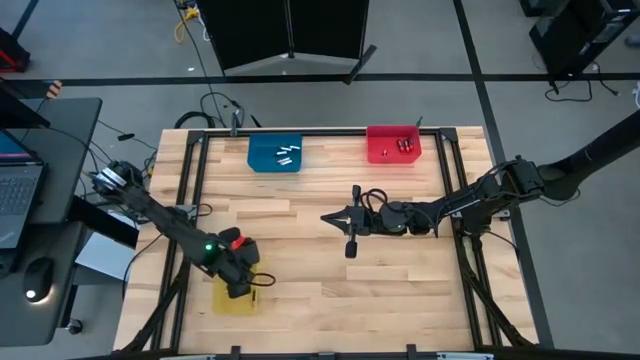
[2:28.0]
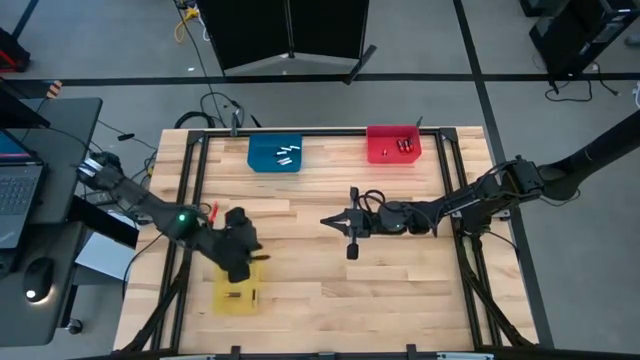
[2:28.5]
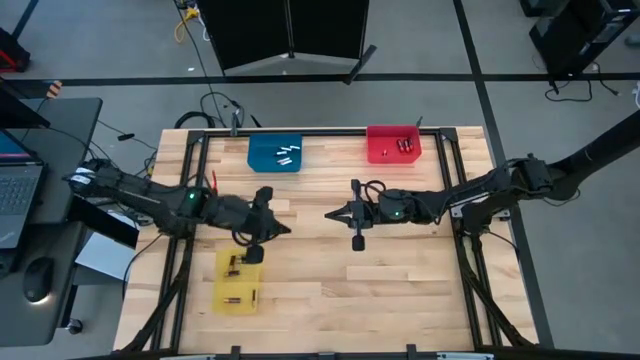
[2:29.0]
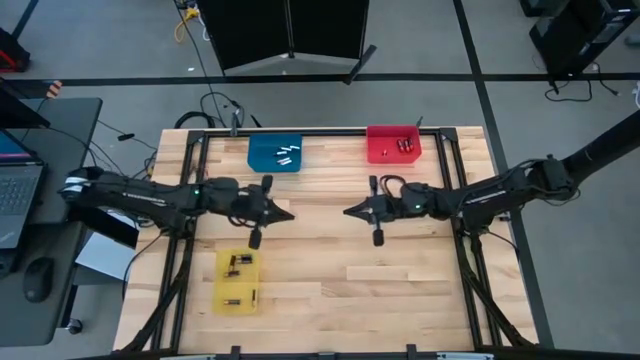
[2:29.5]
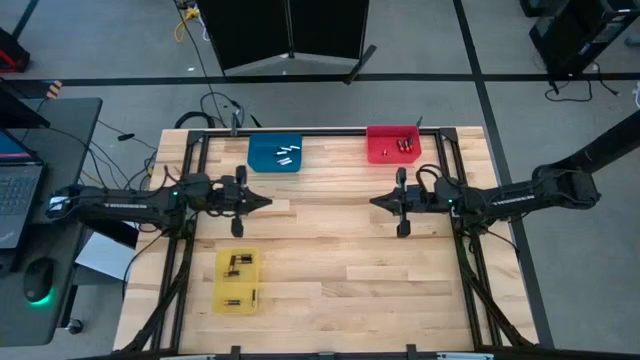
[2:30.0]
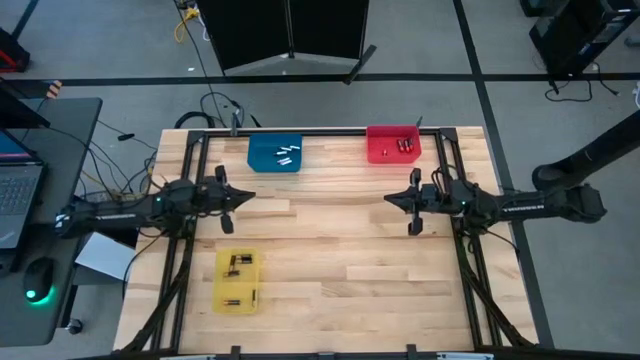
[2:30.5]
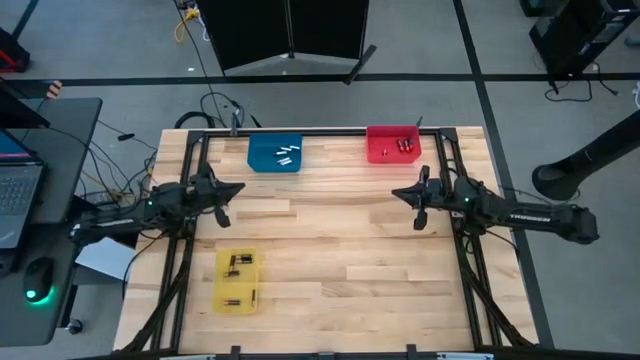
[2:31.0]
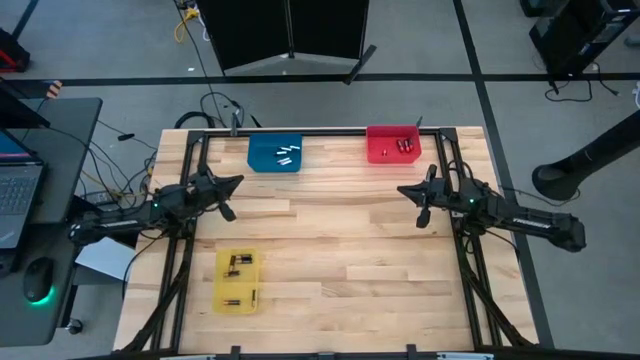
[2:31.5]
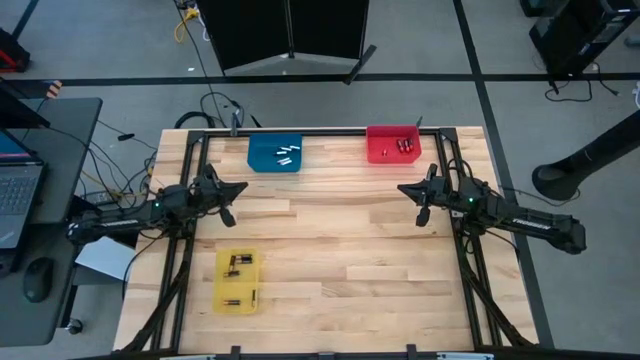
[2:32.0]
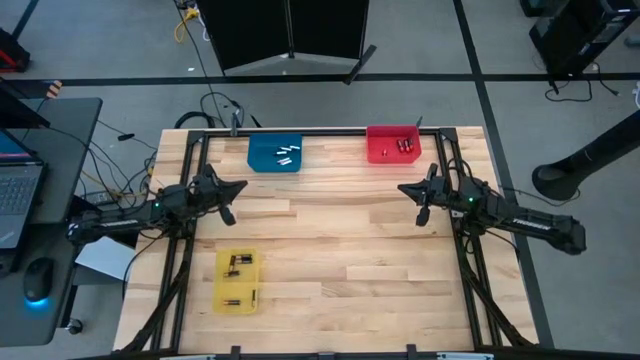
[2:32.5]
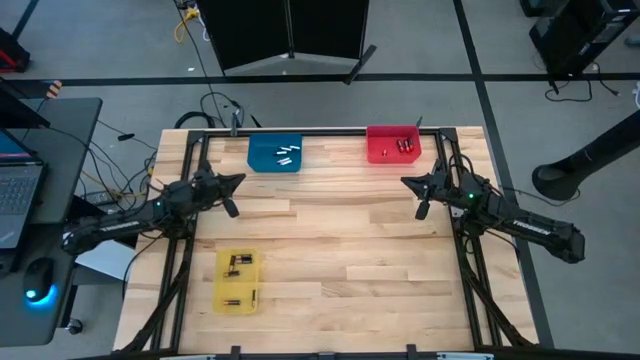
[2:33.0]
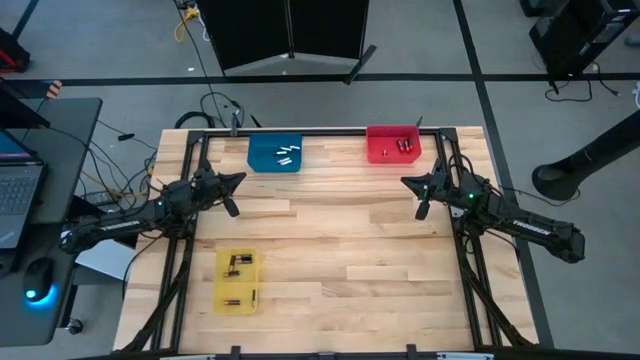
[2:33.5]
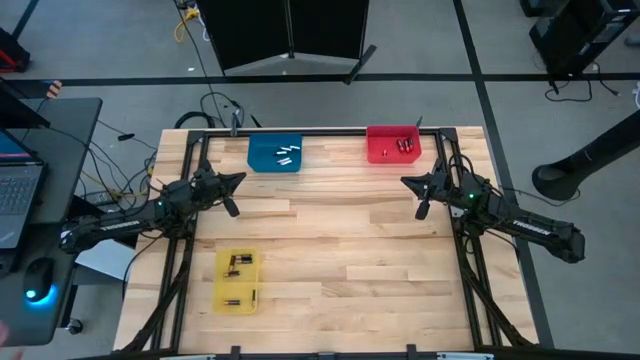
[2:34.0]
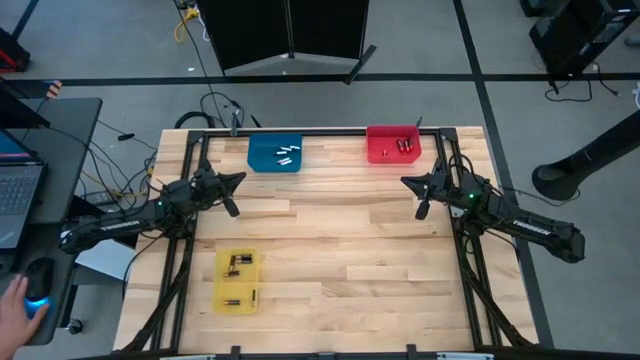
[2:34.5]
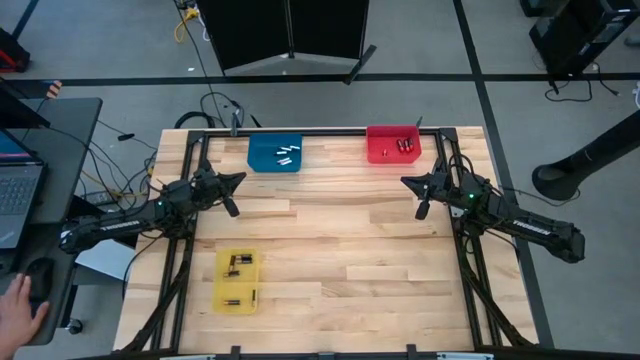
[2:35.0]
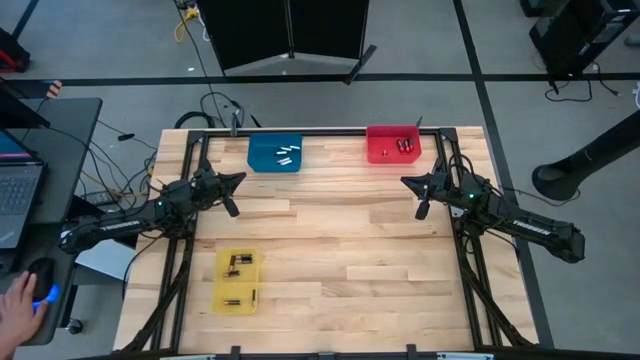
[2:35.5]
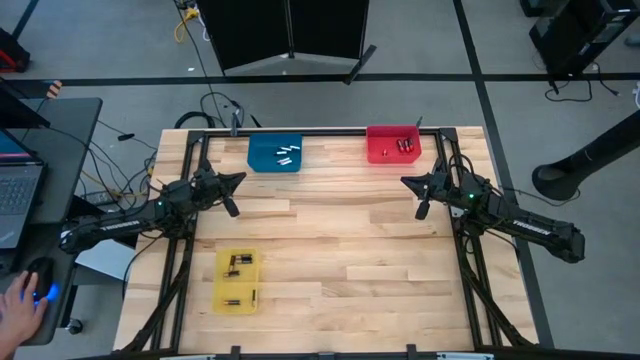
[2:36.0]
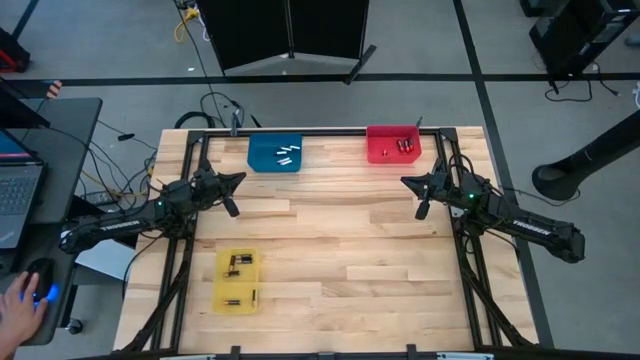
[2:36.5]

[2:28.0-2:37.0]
Task: Sort batteries
Return to Home Position

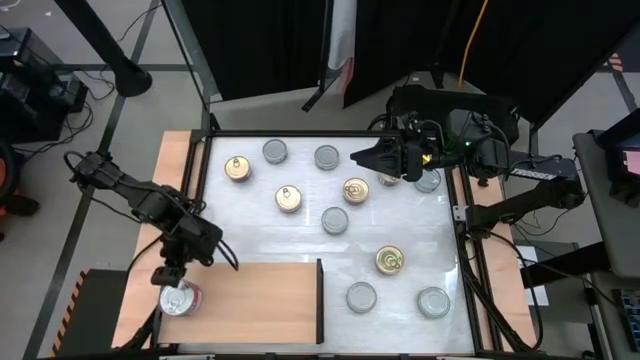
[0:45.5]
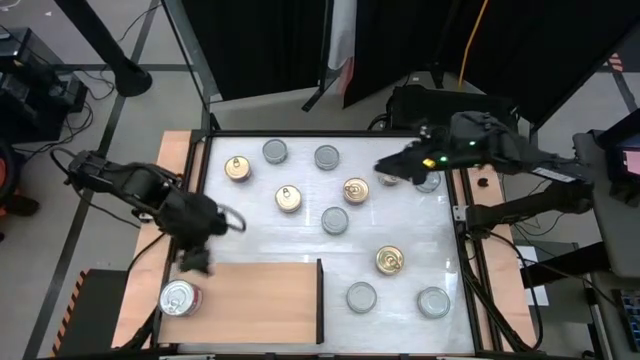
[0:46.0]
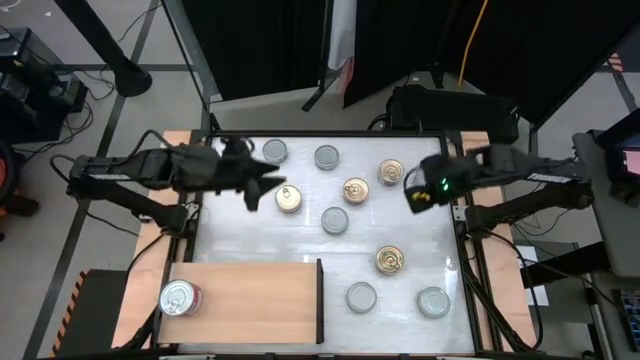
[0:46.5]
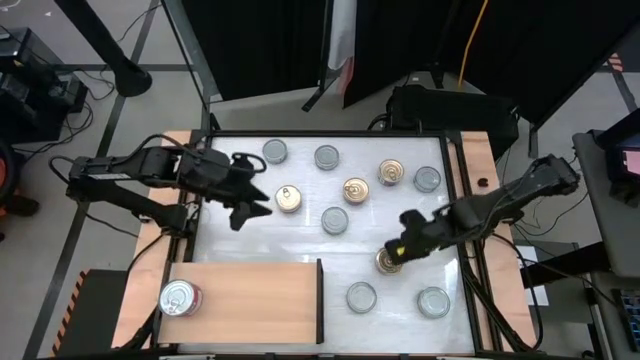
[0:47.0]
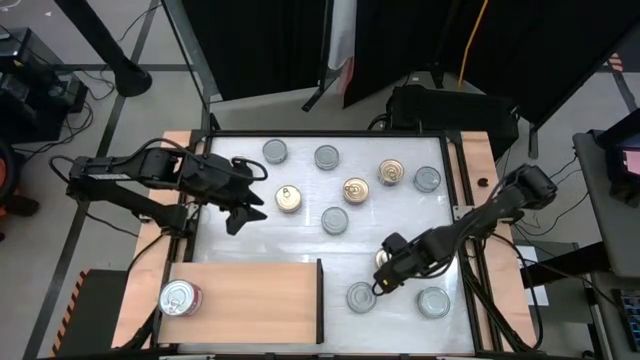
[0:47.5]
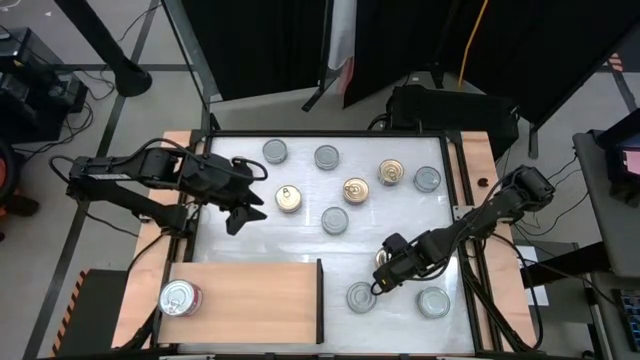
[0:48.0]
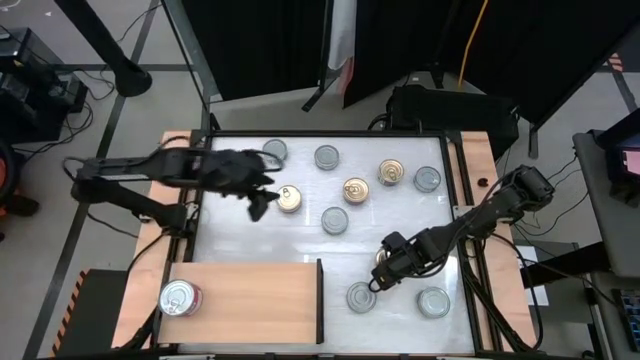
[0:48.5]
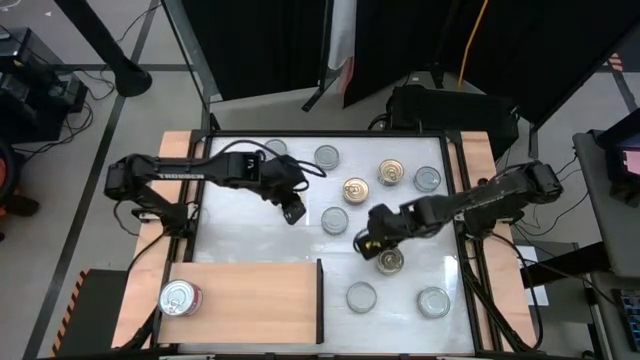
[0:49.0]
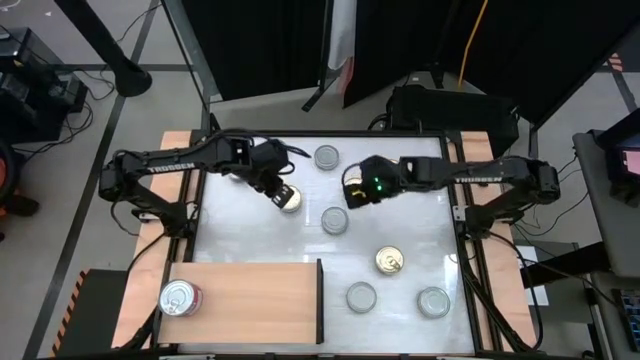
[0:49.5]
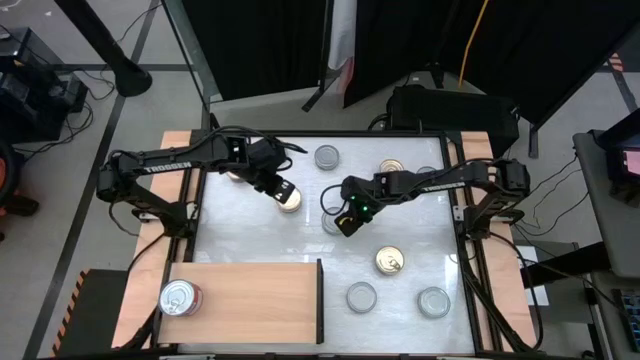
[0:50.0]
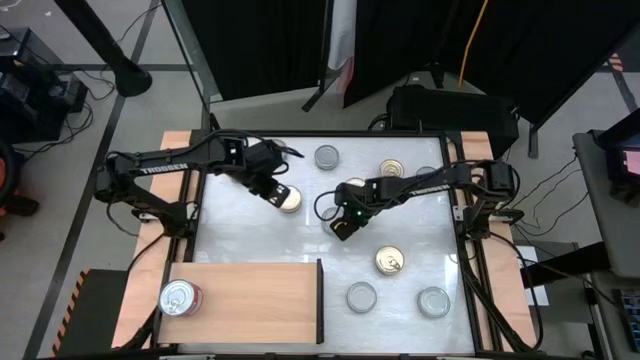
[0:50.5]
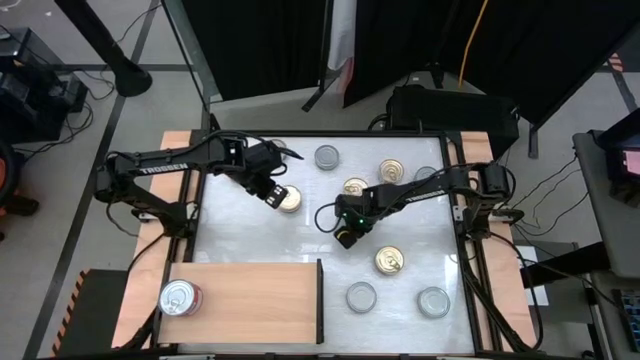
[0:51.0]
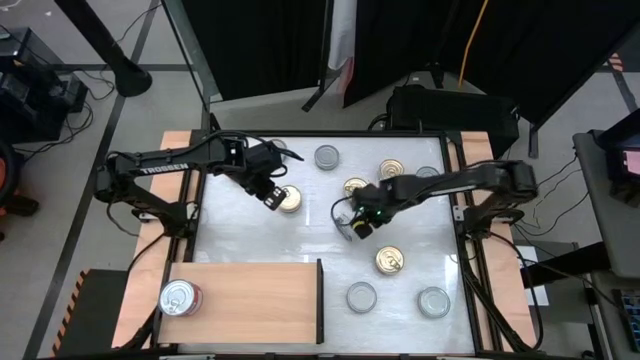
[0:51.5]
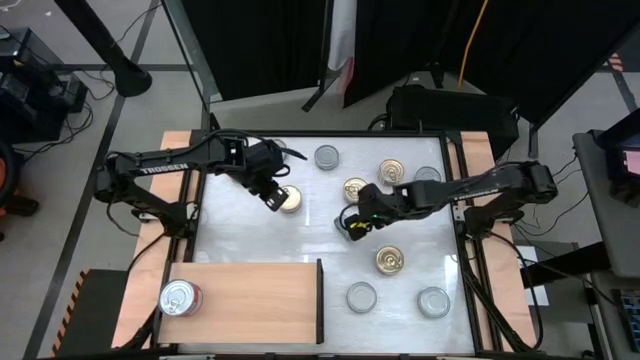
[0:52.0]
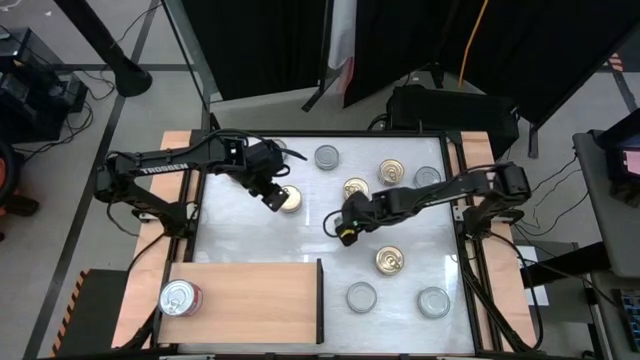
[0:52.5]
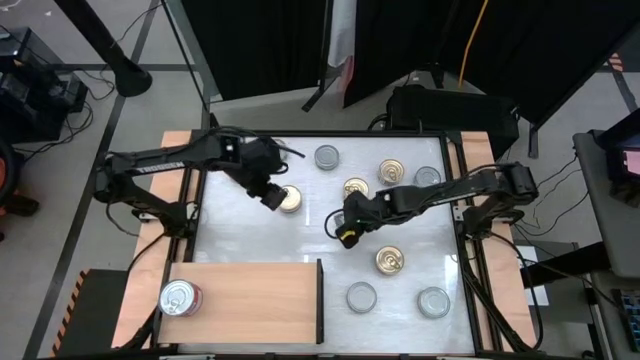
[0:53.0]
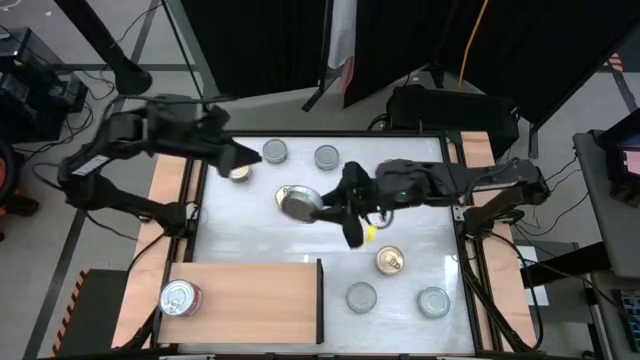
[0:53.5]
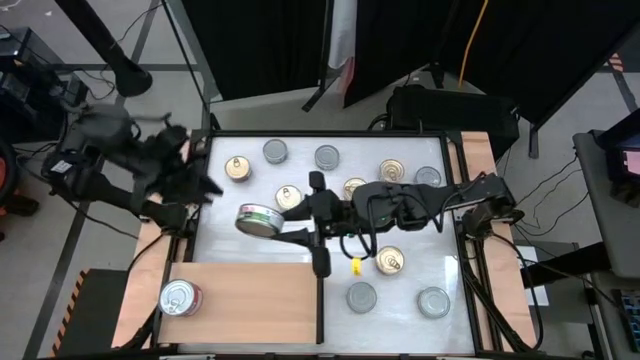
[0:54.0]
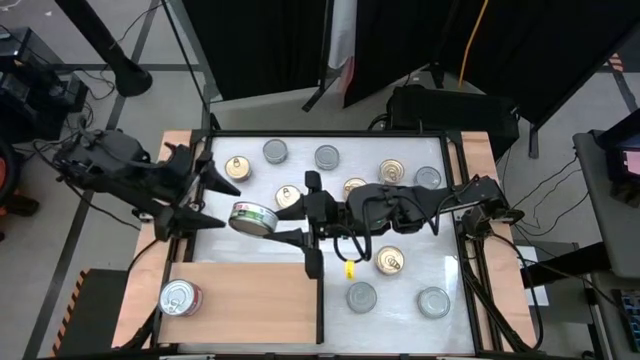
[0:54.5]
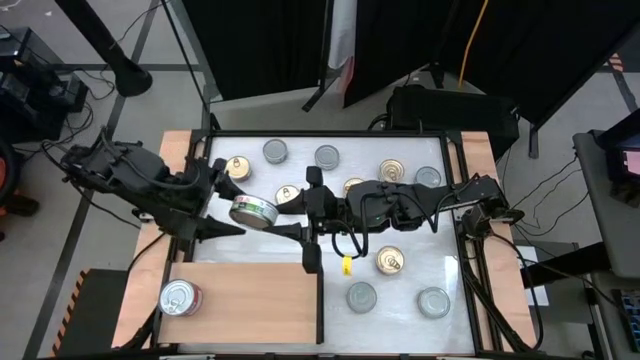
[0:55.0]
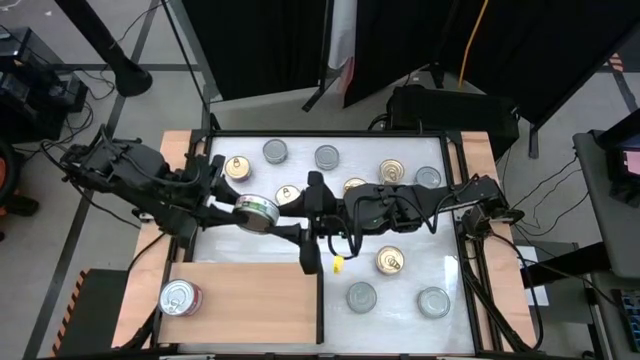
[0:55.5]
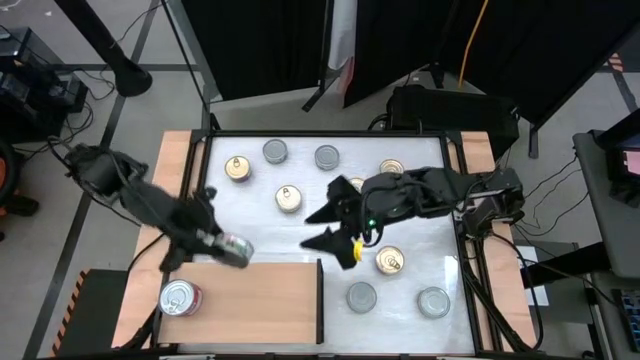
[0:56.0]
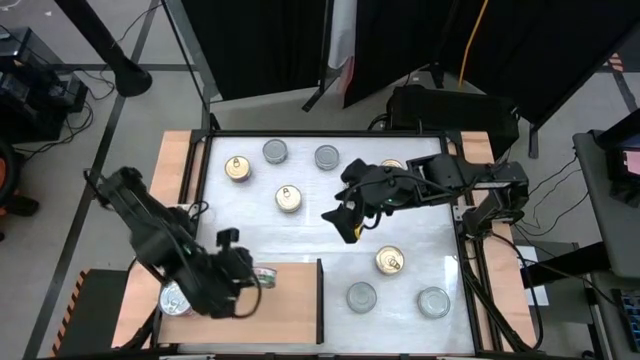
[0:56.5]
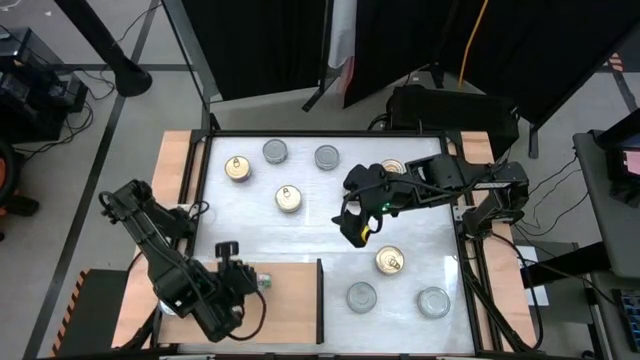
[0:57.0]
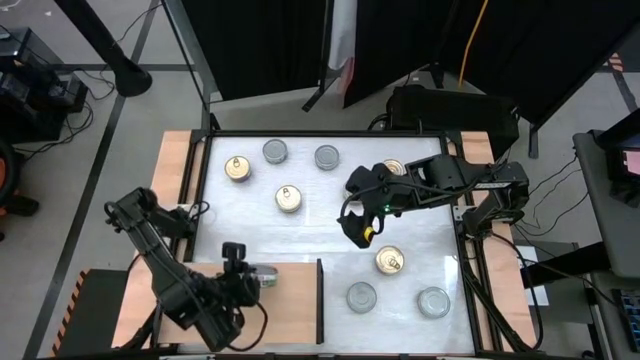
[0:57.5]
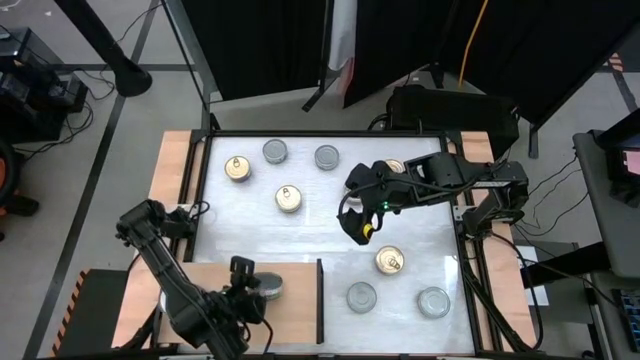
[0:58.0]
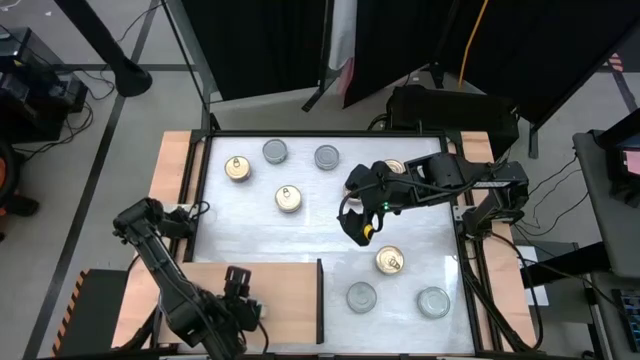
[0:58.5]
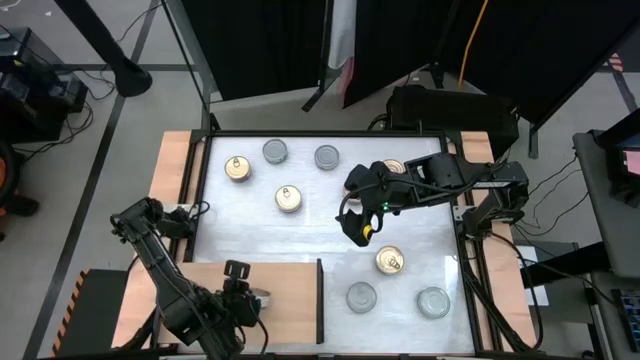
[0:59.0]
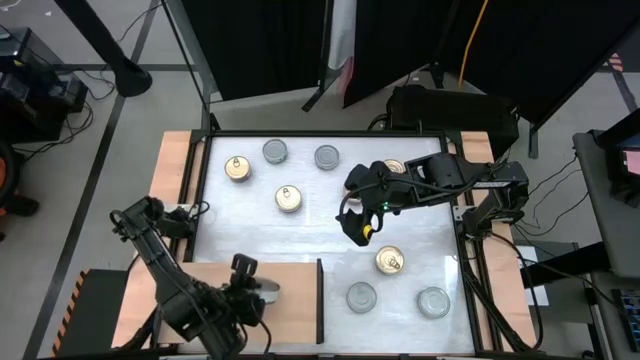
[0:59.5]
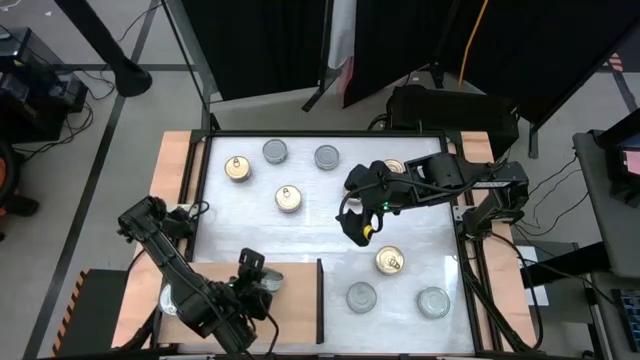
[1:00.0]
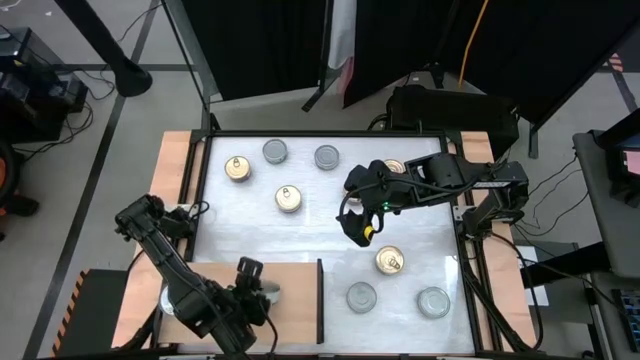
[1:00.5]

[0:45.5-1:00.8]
Task: Stack canned seafood by type on shelf
Put the green white tuna can on the shelf
